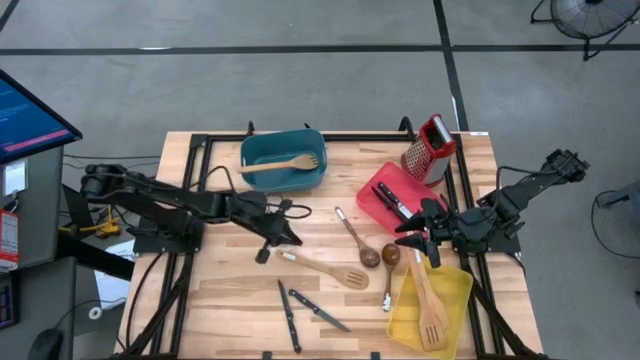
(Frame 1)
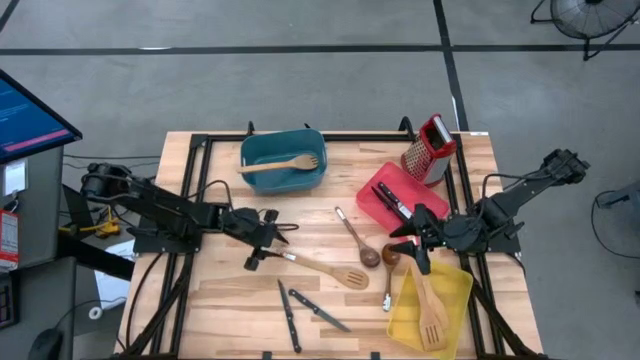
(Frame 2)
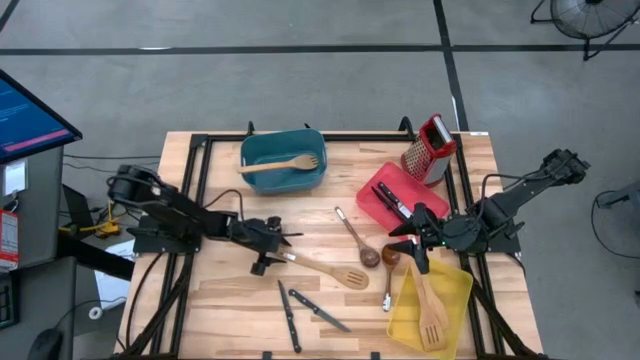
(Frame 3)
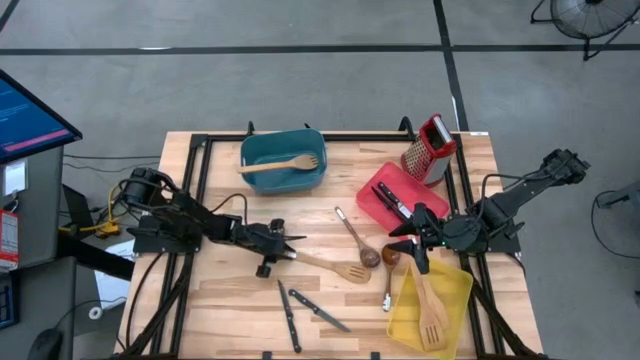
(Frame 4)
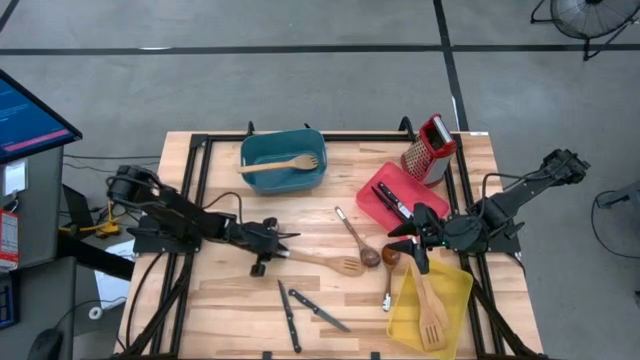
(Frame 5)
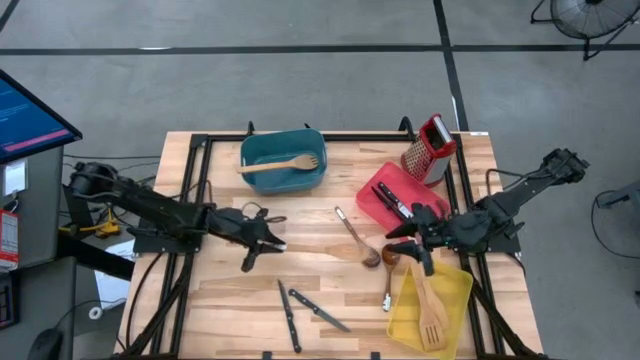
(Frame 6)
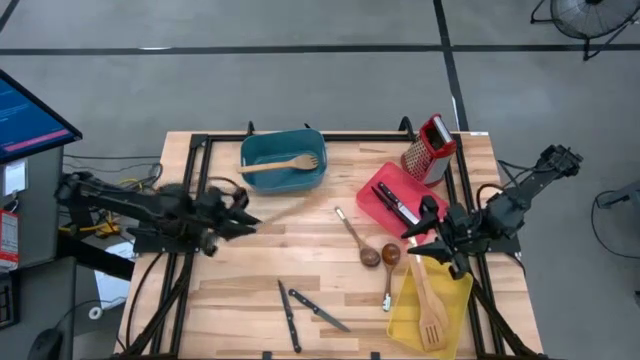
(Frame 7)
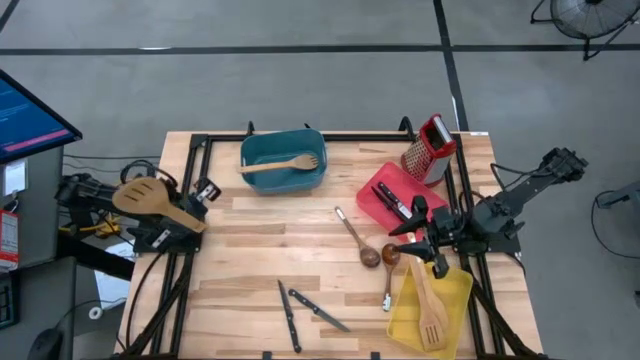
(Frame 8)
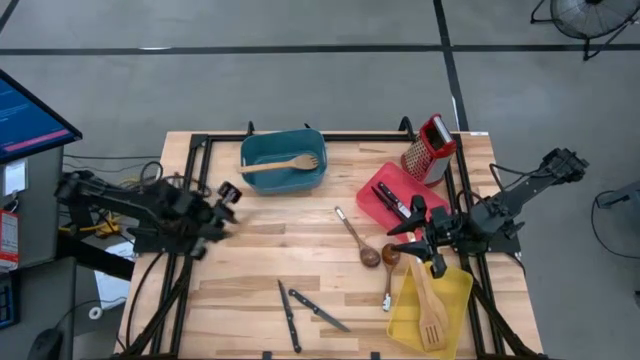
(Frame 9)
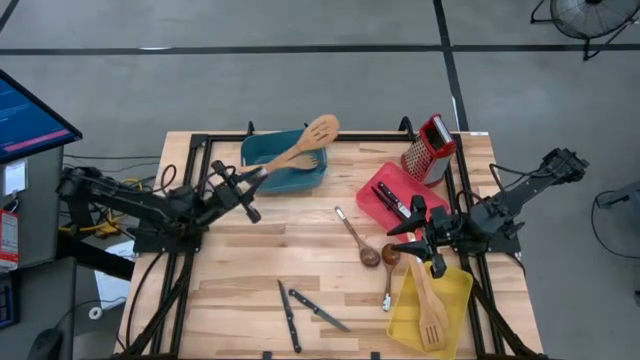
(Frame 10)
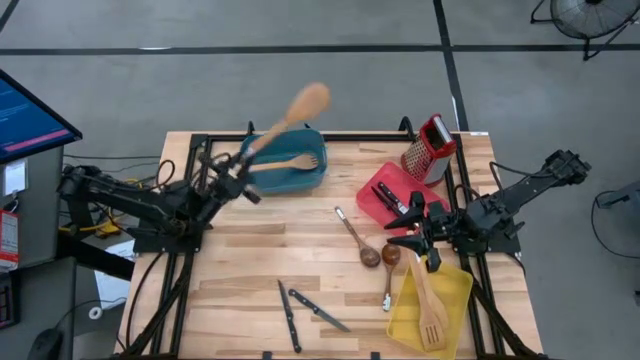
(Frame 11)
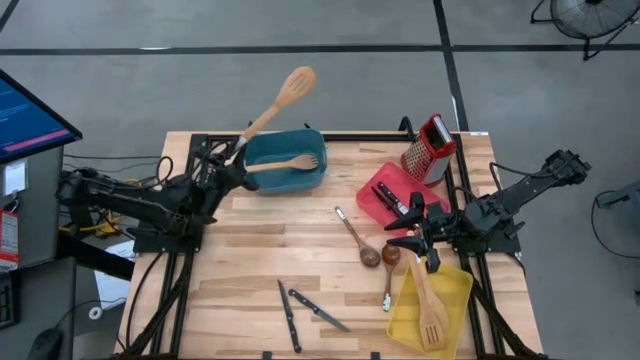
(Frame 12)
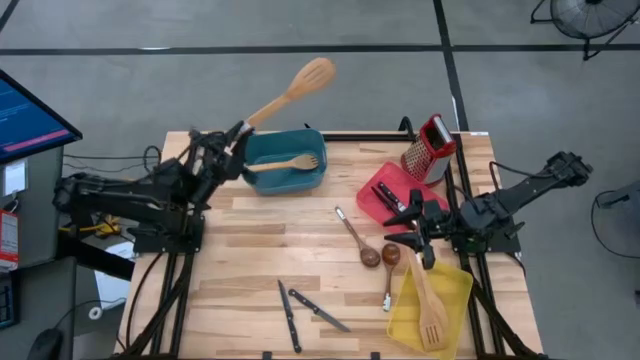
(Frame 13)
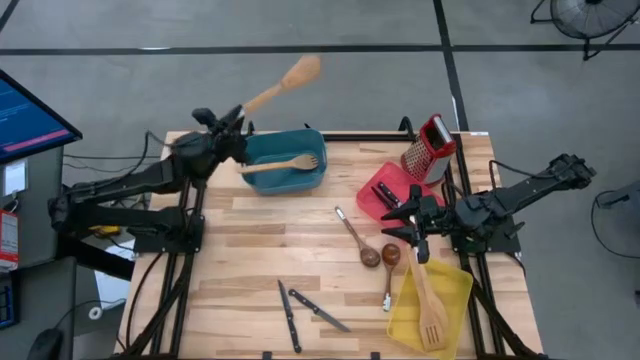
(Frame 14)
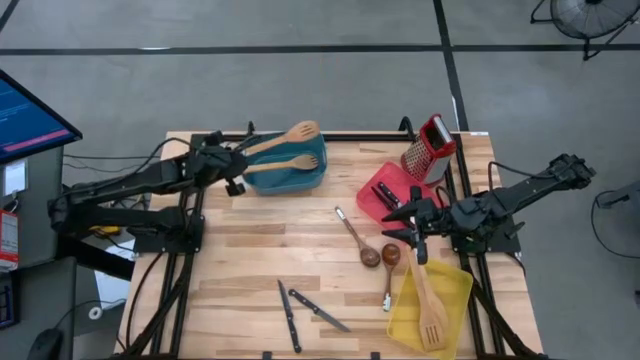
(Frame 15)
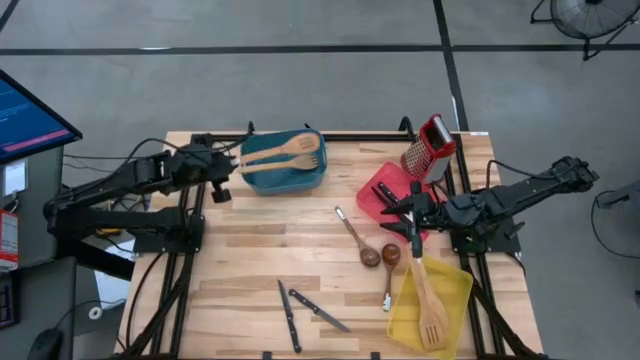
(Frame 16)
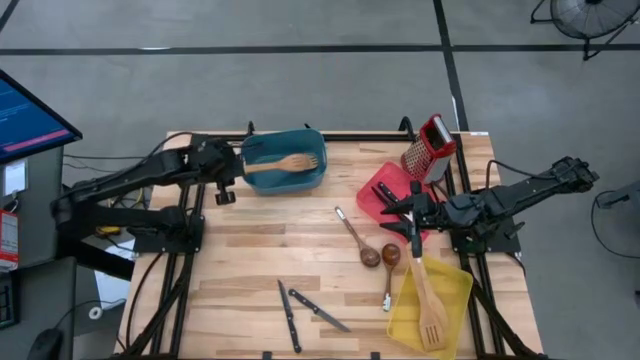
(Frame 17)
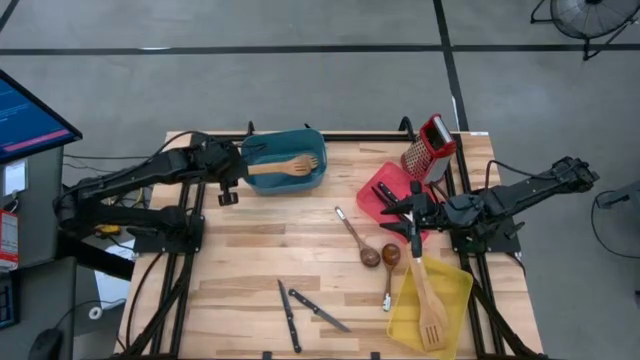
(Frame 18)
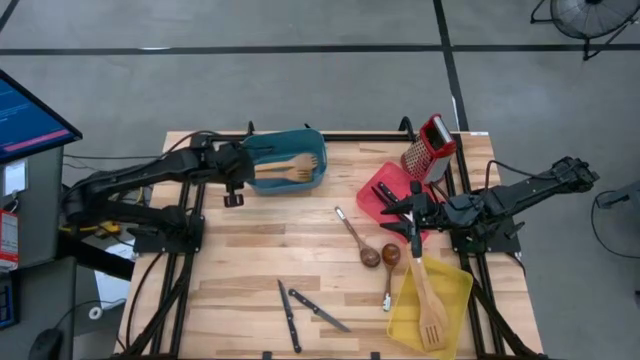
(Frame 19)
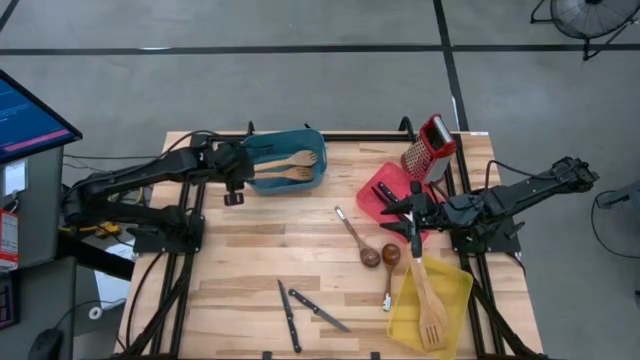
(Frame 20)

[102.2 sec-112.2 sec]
Task: Pick & Place Kitchen Items
Put the wooden slotted serving spoon into the blue bin

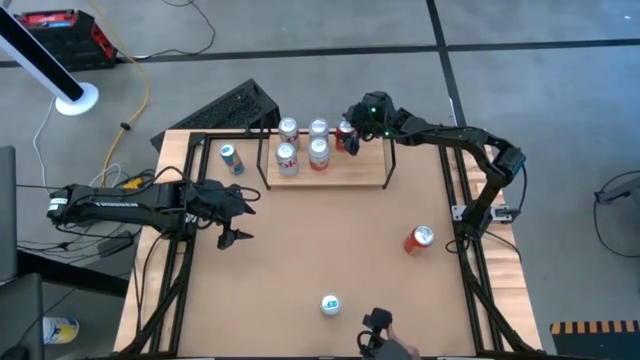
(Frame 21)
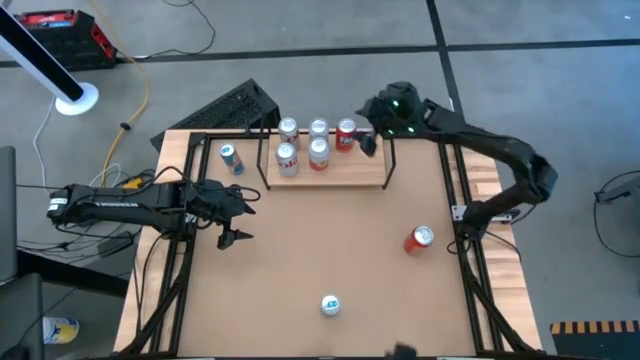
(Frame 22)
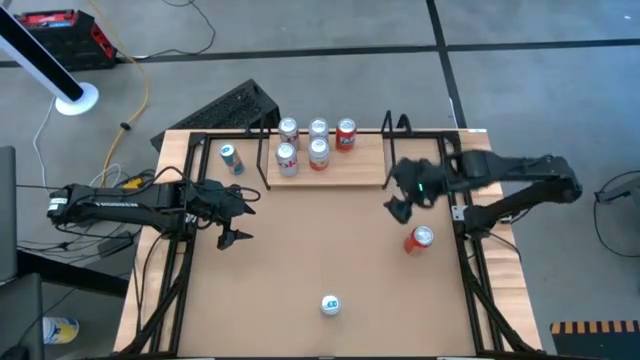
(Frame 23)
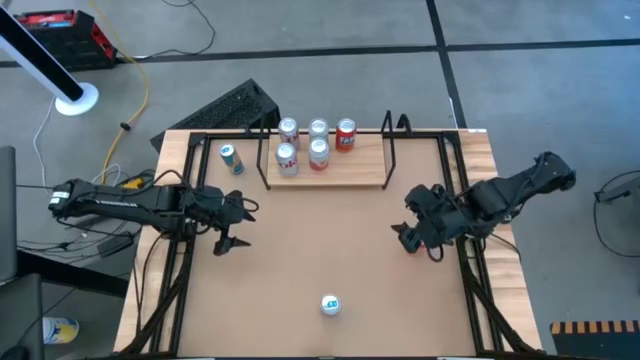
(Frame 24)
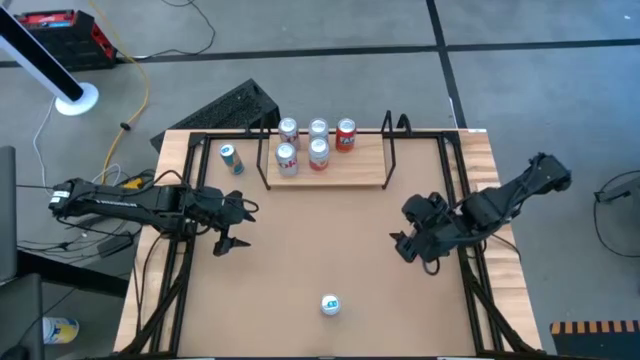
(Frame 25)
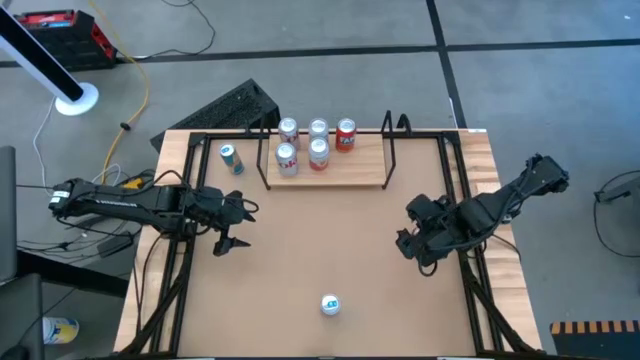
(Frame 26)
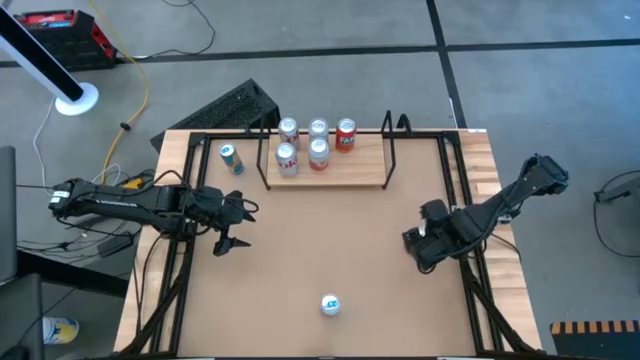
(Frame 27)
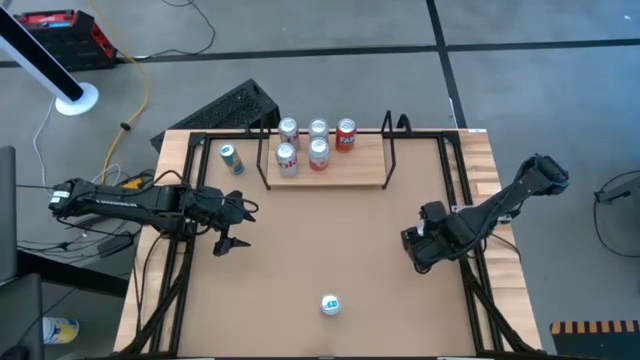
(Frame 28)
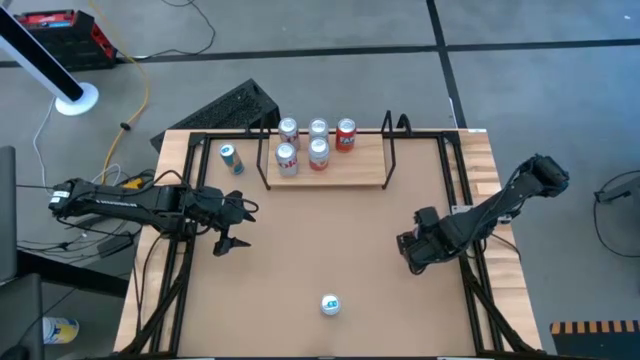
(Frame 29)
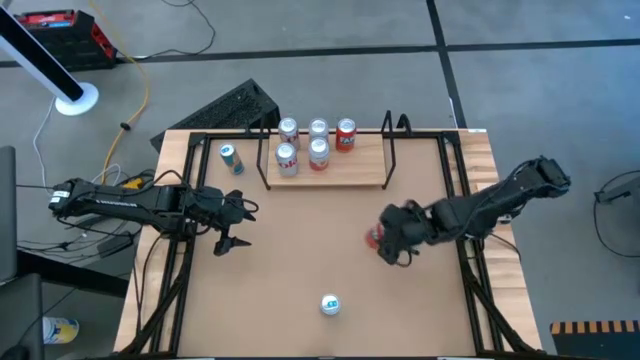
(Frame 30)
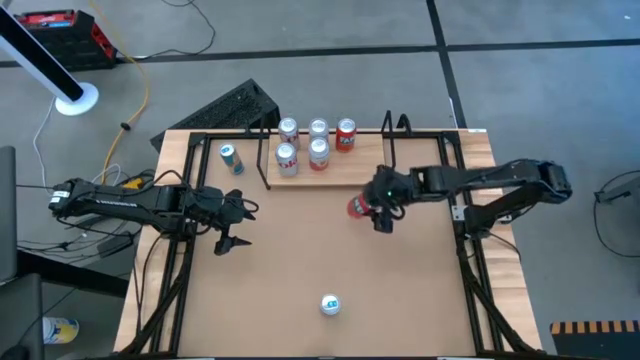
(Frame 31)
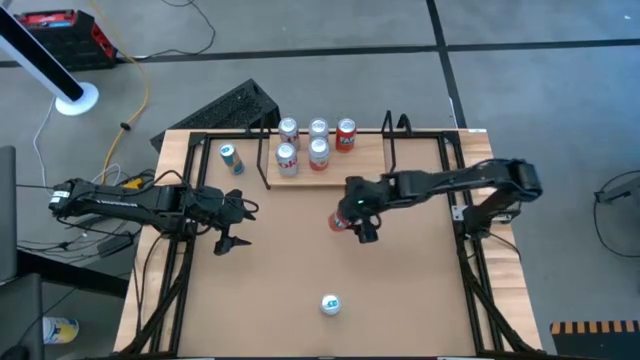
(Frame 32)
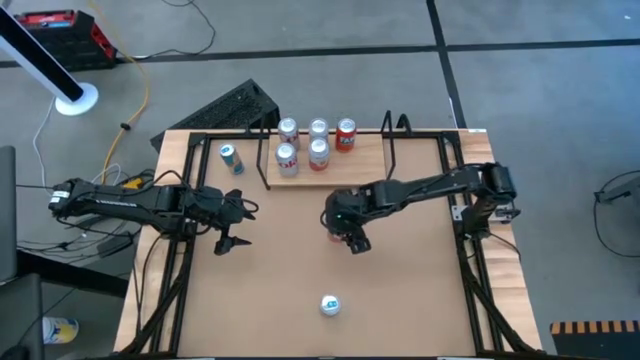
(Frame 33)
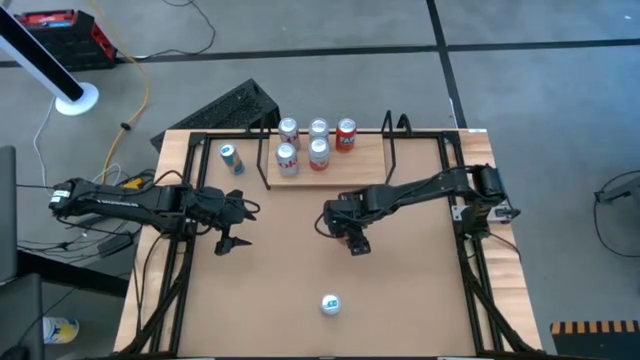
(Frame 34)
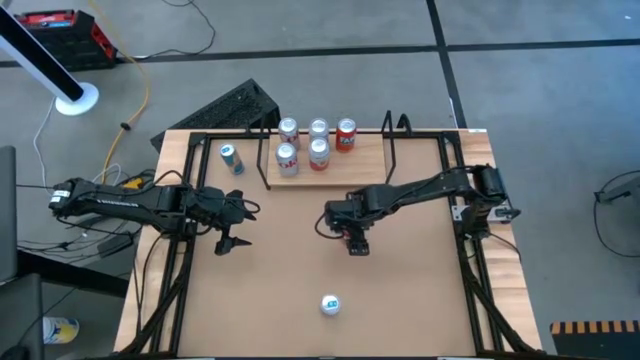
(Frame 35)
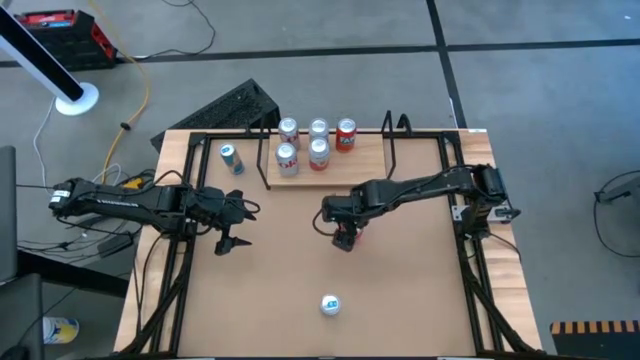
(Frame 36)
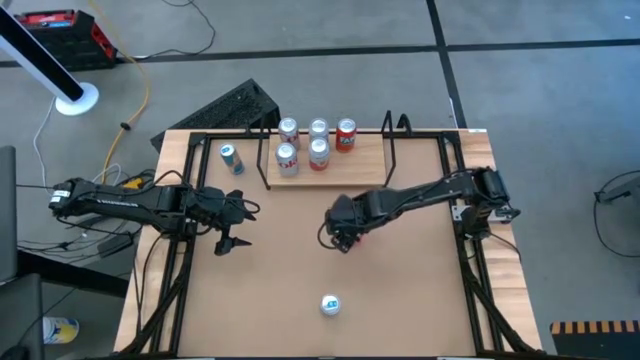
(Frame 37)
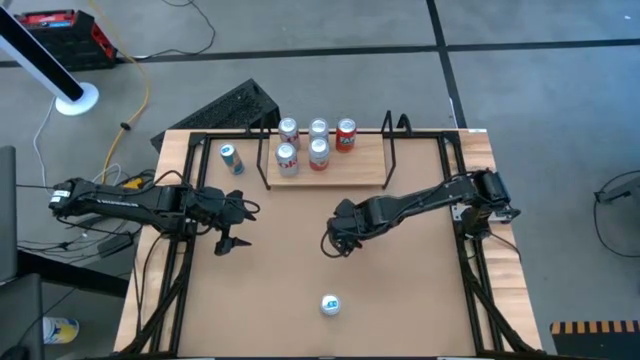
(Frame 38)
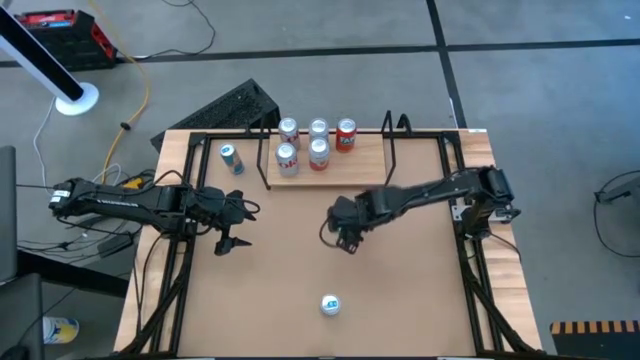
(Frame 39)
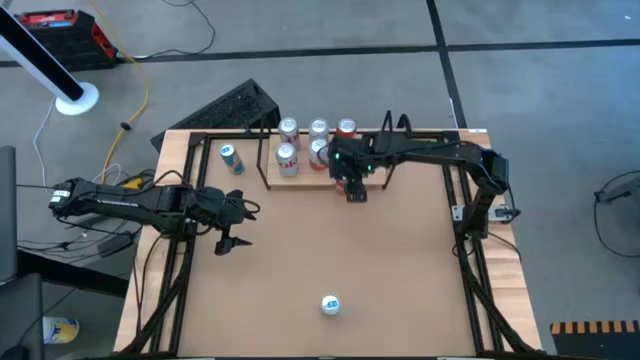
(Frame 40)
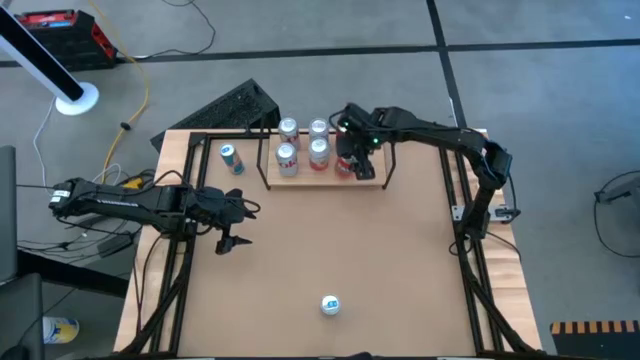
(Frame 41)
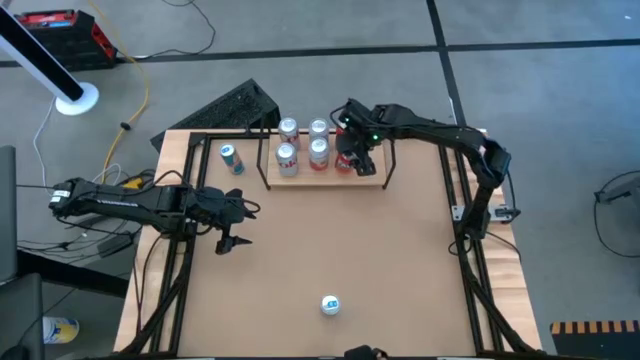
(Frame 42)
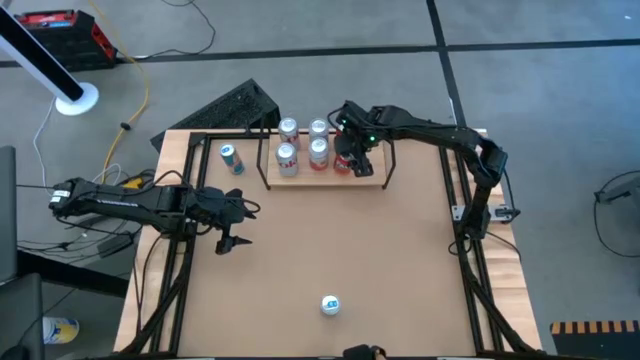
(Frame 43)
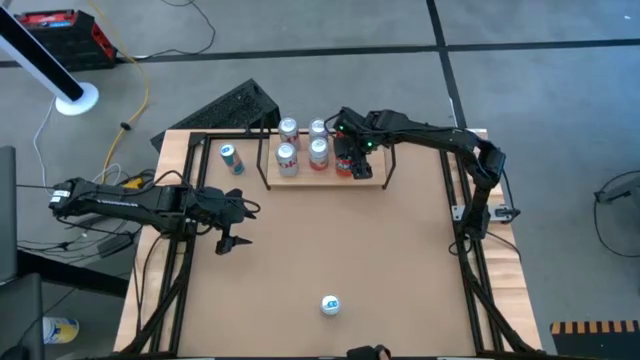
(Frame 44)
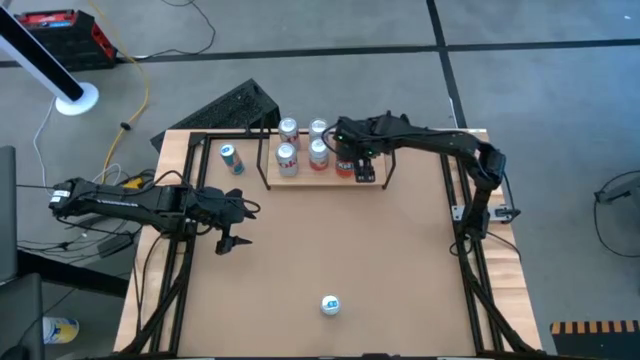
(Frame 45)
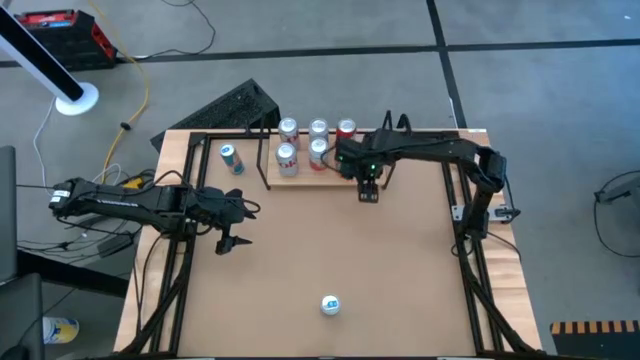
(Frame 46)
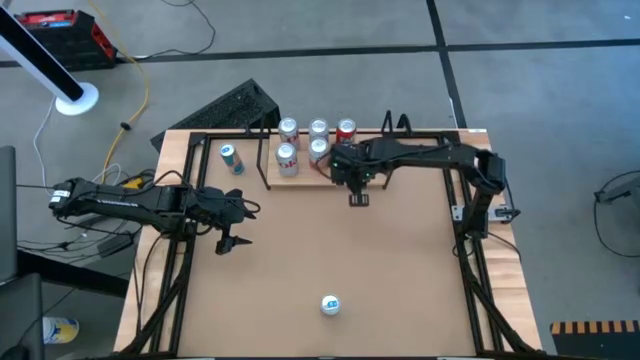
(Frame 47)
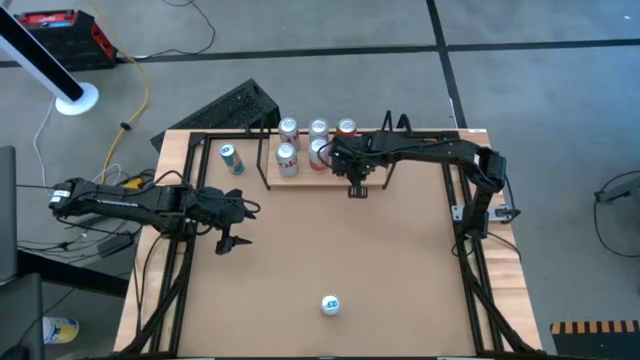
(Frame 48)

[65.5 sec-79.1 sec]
Task: Place canned beverage on shelf
Put the orange soda can on the shelf aligned with the other orange soda can
